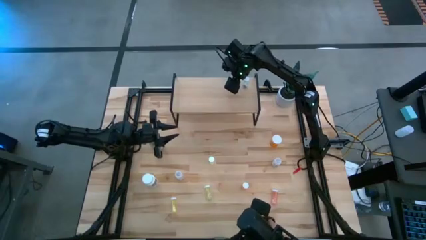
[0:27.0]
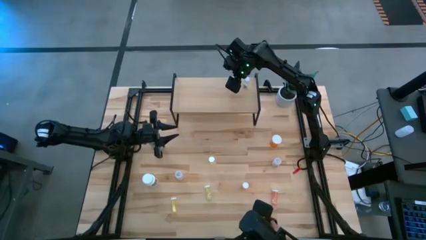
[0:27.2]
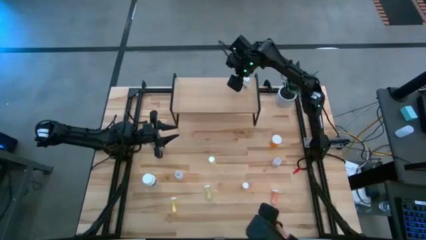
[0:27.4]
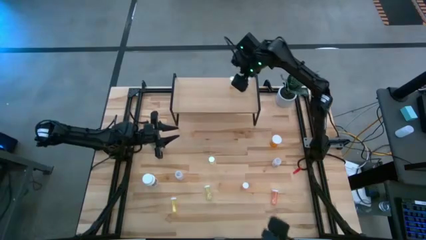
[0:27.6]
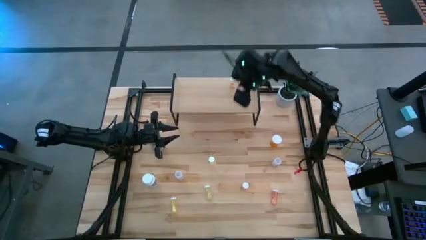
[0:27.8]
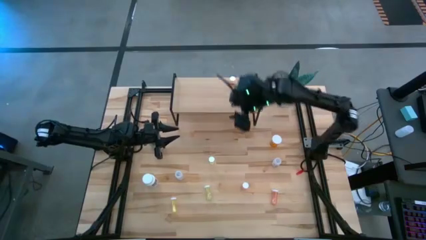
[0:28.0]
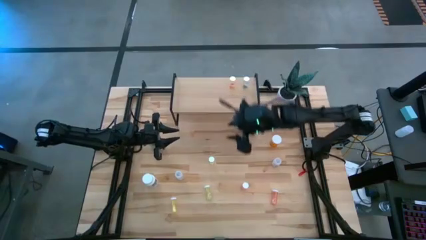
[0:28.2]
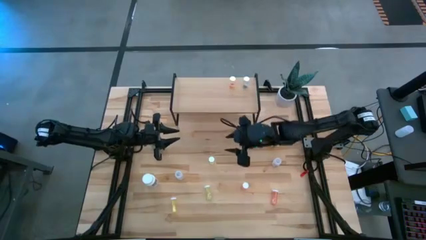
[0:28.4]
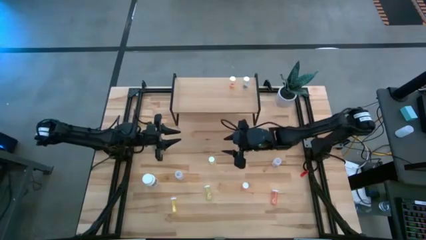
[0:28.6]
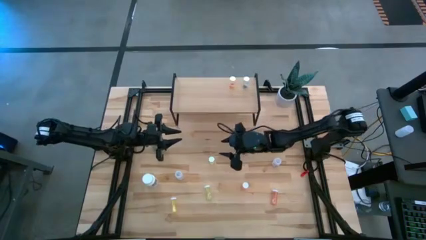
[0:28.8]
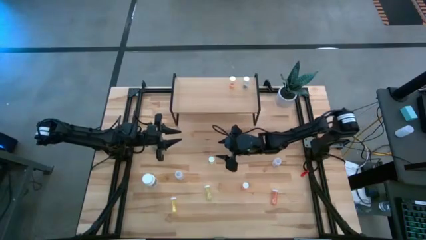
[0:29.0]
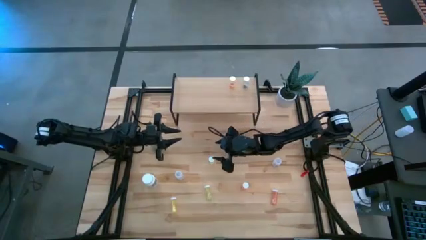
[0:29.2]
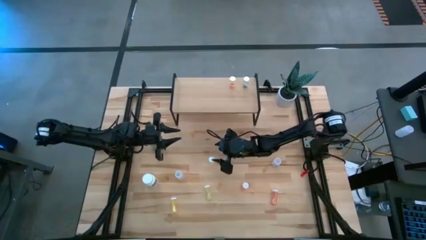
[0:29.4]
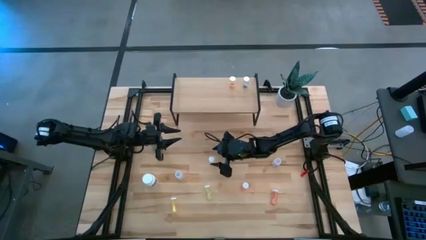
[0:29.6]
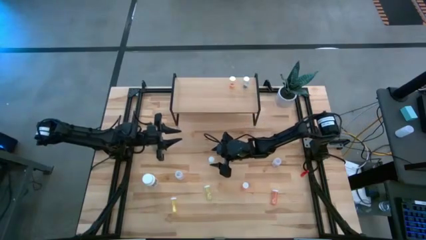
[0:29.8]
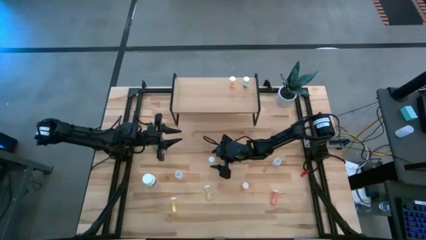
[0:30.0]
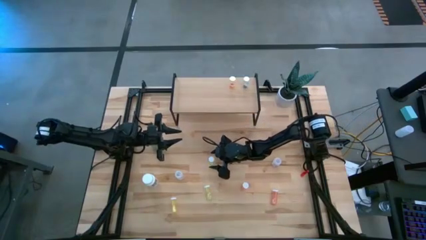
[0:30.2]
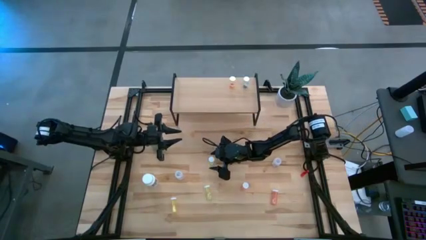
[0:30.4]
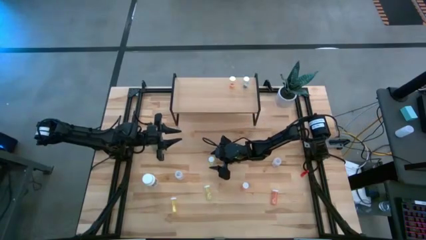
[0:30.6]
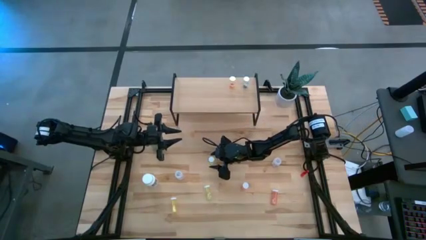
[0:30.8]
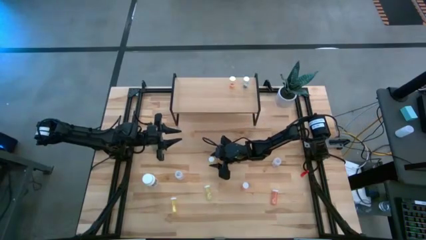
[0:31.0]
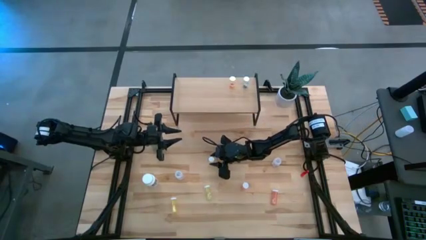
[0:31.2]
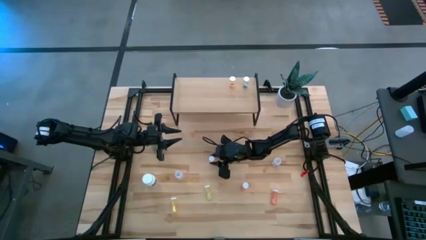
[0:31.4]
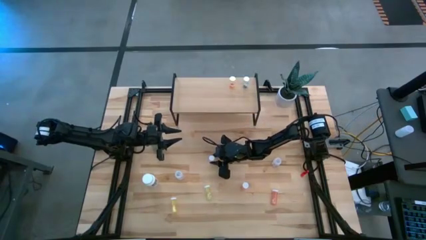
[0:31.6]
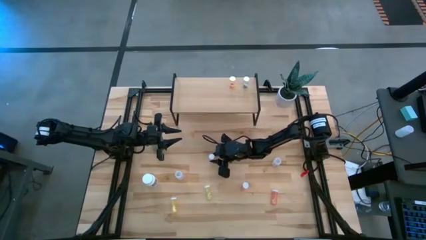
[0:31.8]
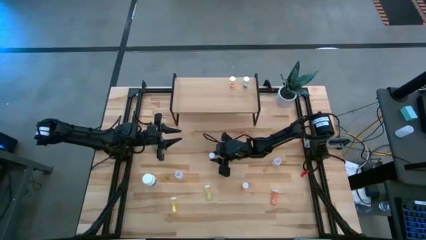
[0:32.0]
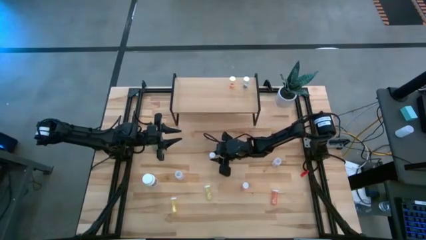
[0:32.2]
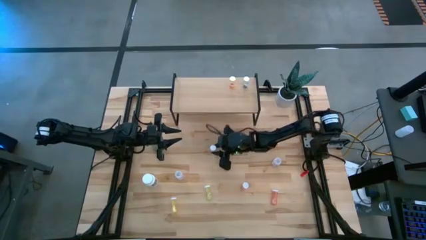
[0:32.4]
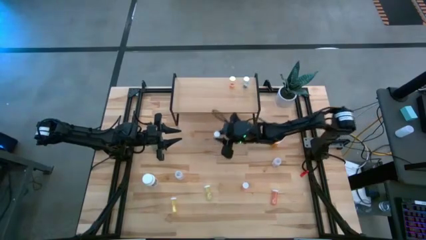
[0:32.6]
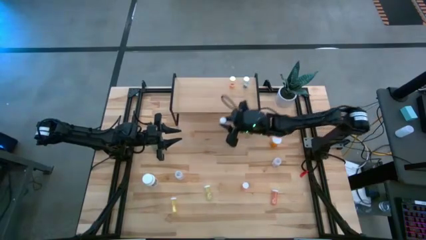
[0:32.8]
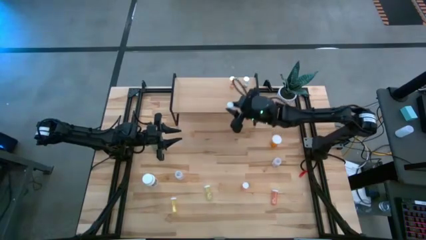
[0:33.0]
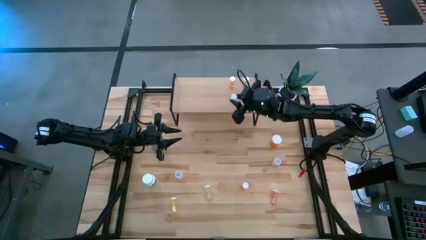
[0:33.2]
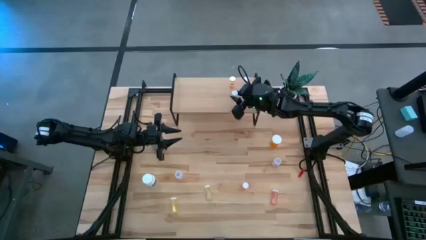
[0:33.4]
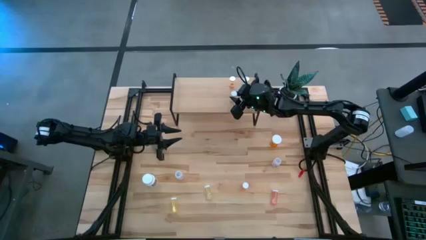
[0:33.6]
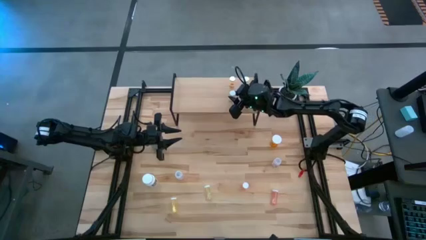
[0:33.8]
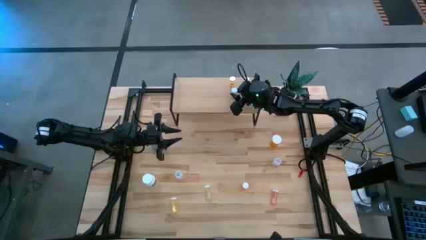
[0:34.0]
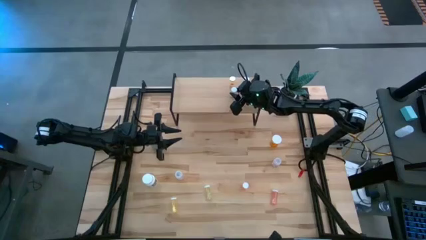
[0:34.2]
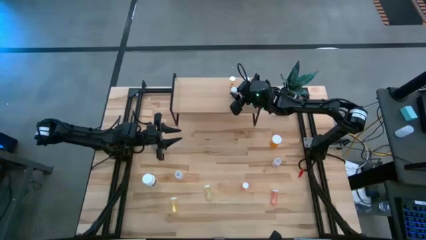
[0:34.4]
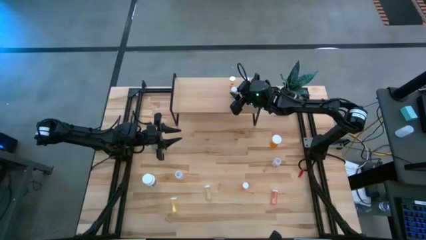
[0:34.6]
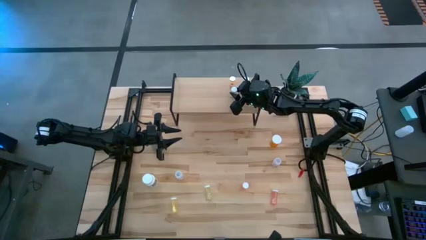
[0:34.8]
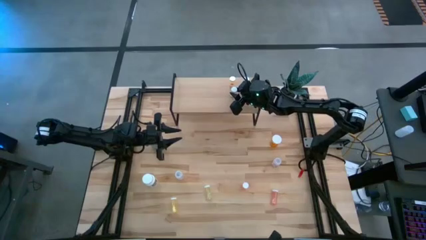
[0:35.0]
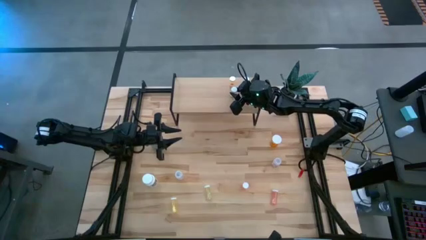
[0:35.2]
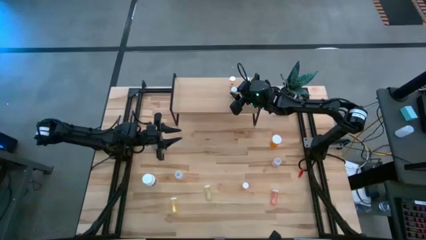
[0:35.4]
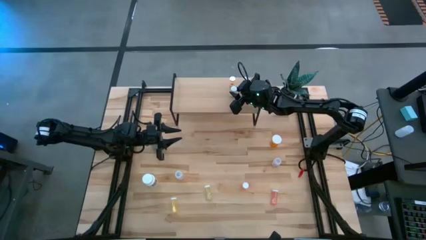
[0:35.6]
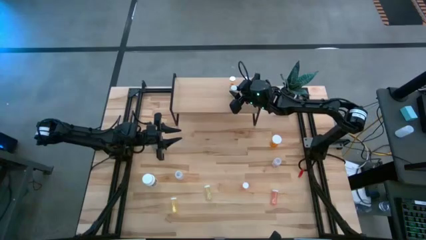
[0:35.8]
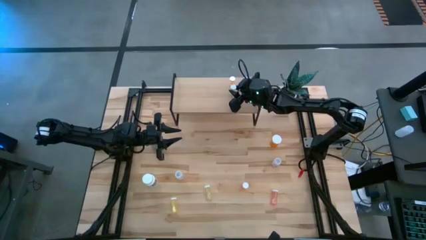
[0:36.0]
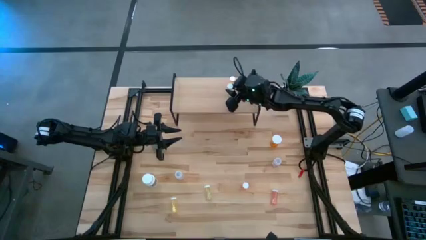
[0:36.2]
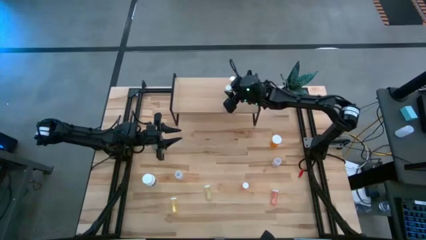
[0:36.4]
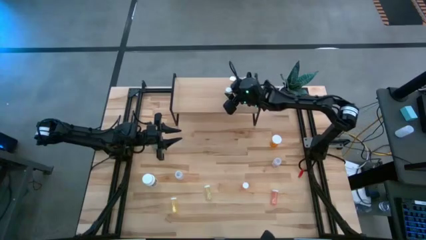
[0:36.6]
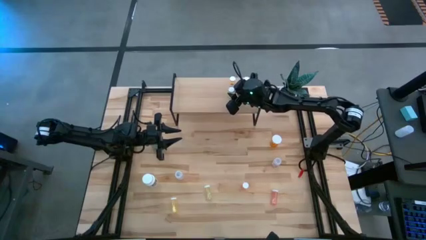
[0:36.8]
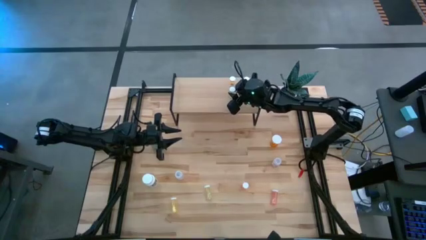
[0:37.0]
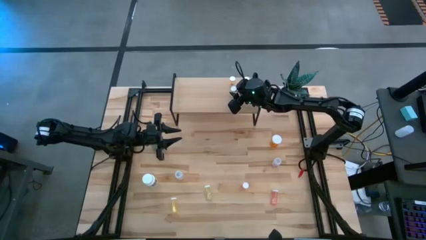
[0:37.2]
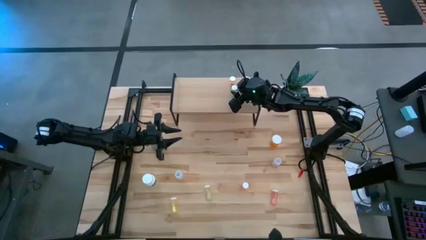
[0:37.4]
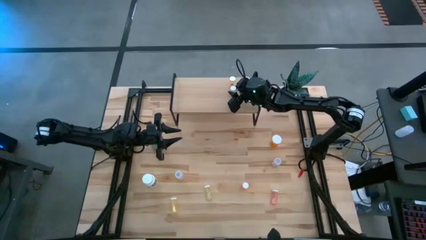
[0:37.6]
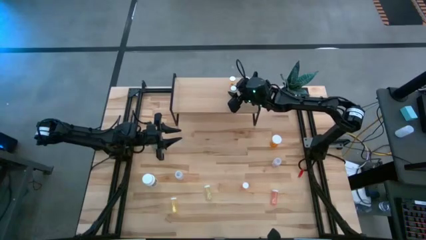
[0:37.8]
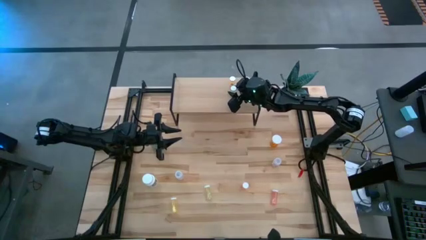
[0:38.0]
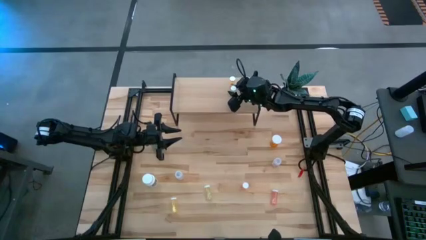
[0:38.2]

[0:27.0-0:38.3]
Task: Pick and place medicine bottles onto shelf by color
Put the top yellow pill bottle on the shelf
